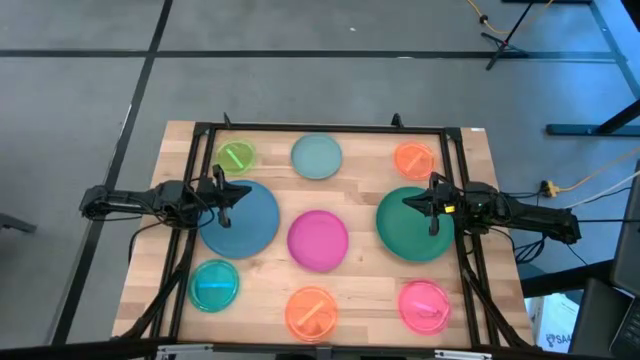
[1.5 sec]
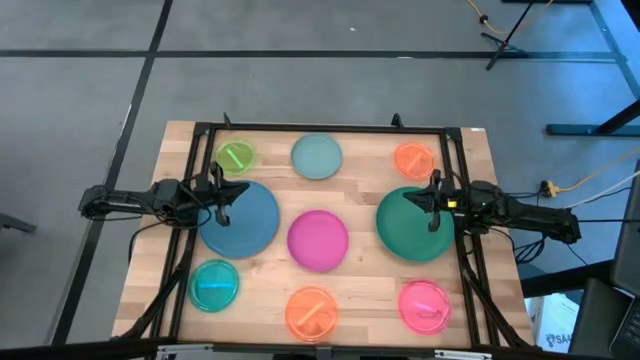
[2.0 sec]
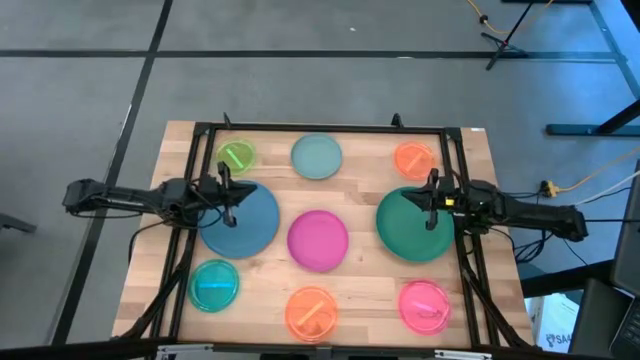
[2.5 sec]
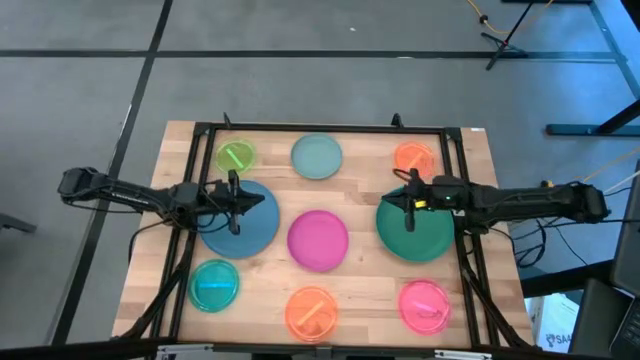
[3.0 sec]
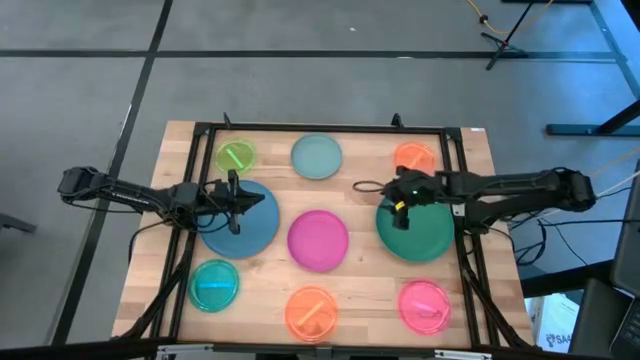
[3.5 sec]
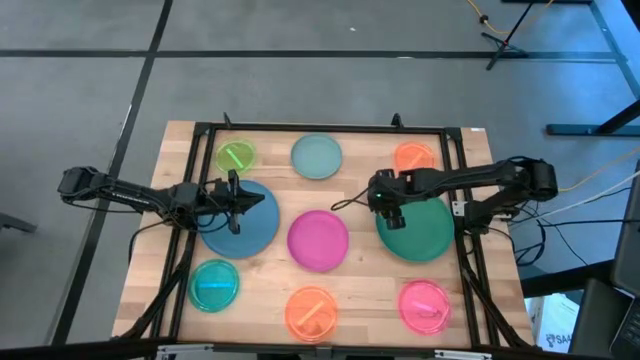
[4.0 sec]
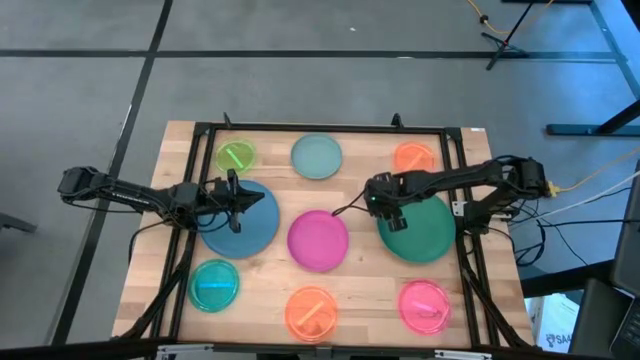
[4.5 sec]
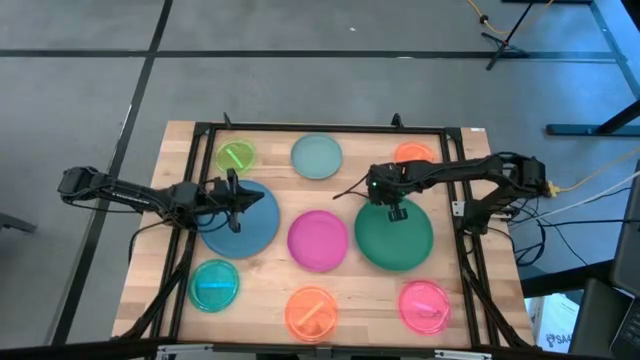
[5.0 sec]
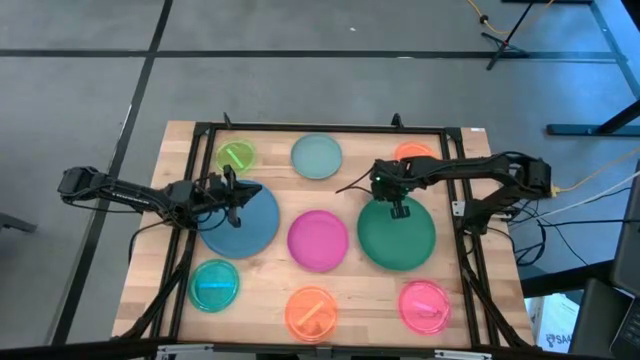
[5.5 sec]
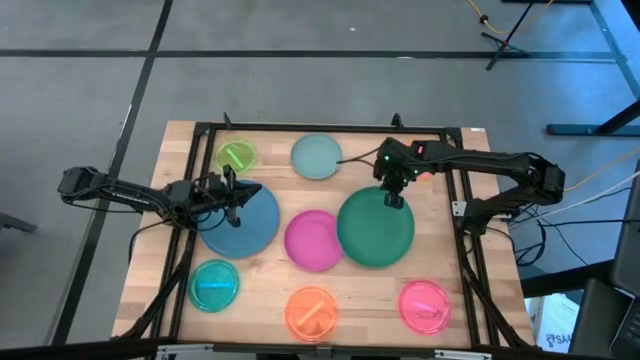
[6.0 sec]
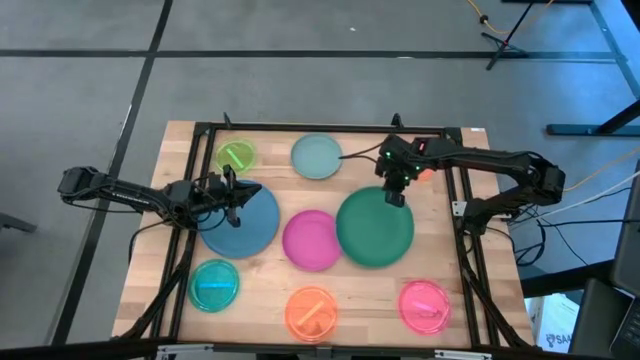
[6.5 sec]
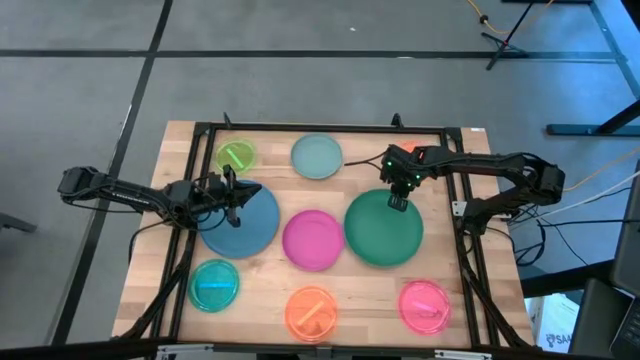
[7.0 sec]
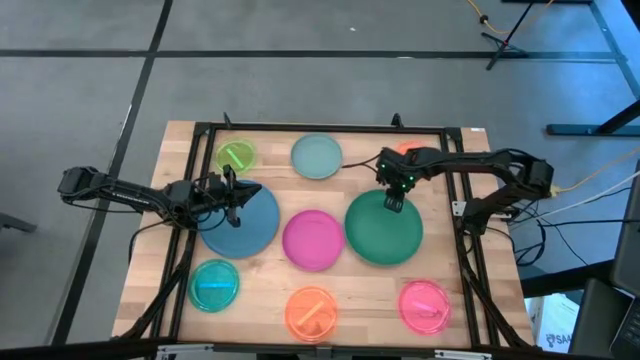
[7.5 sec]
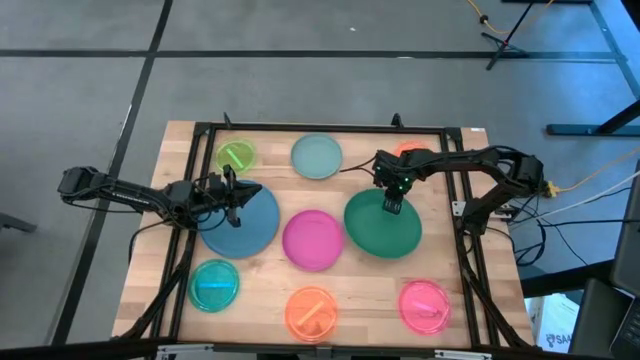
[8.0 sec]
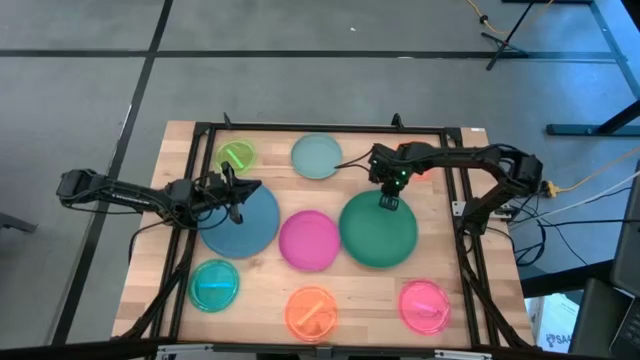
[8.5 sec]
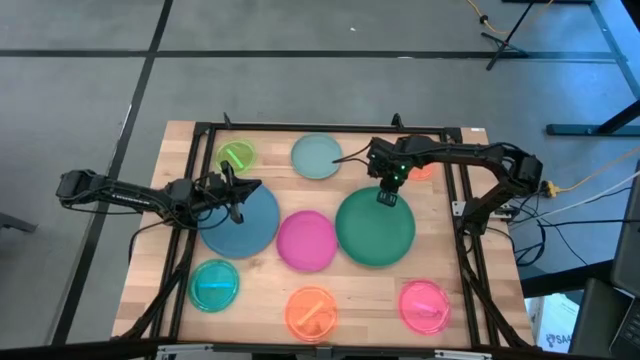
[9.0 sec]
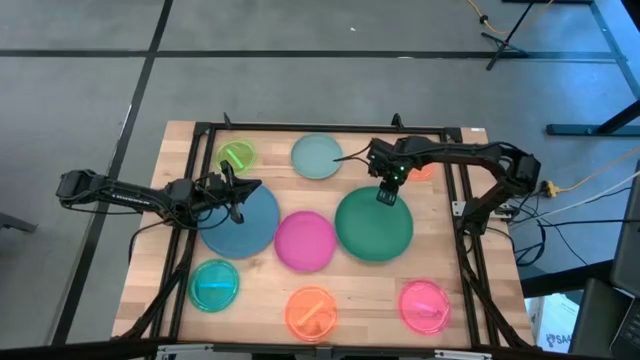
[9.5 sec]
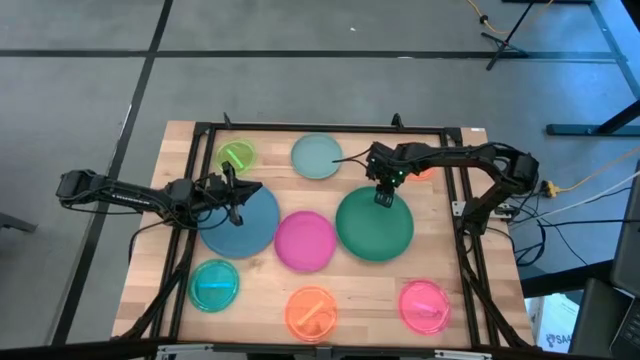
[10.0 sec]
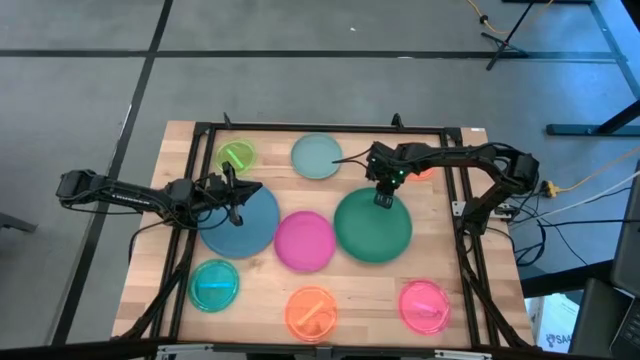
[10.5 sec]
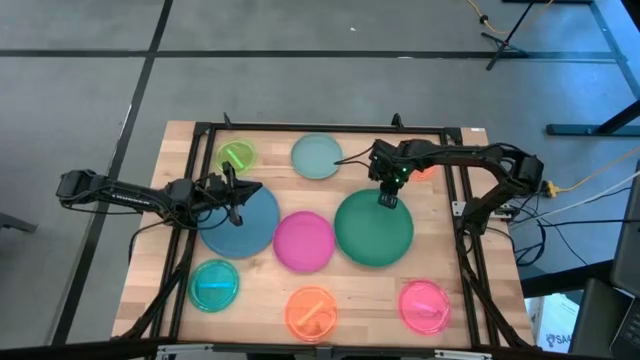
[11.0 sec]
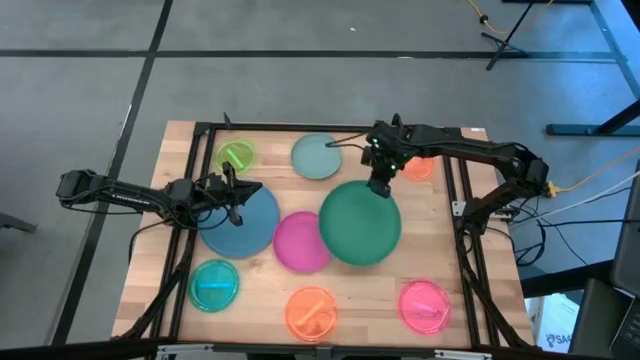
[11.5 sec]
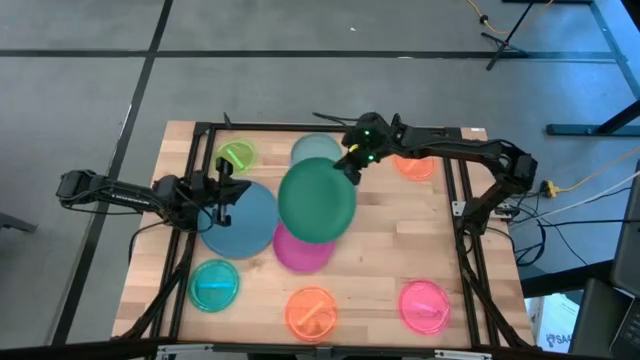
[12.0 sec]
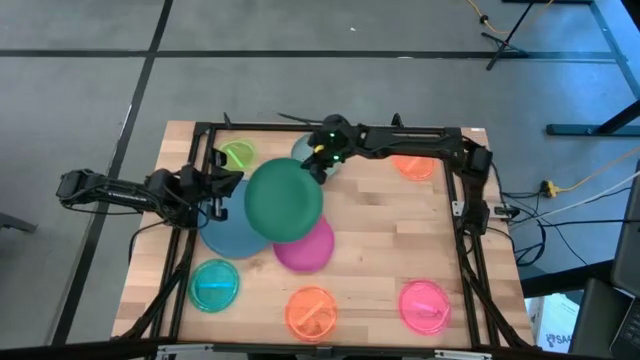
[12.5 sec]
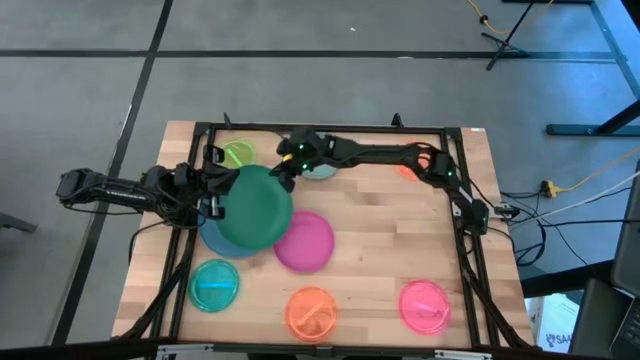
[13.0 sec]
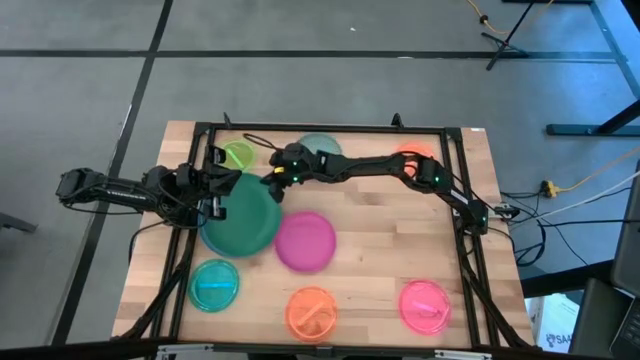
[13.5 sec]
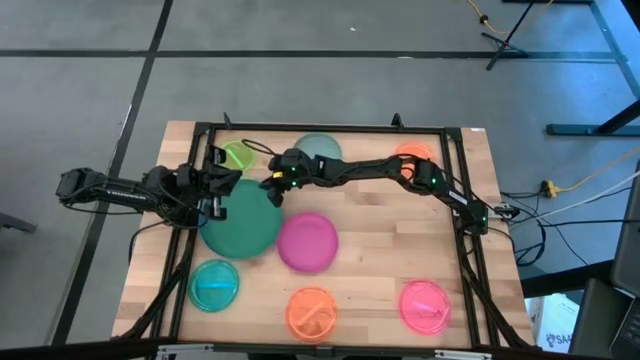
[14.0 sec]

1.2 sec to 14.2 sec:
Task: Stack plastic plates
Stack the green plate on top of the dark blue plate

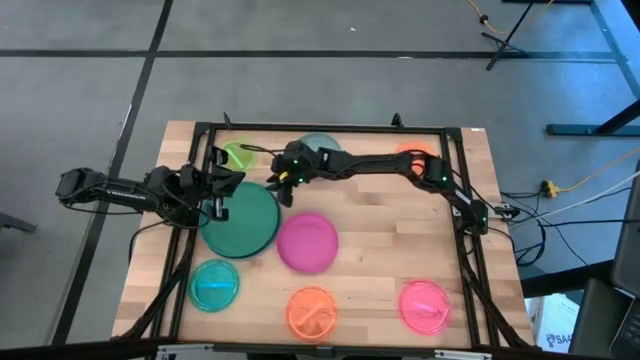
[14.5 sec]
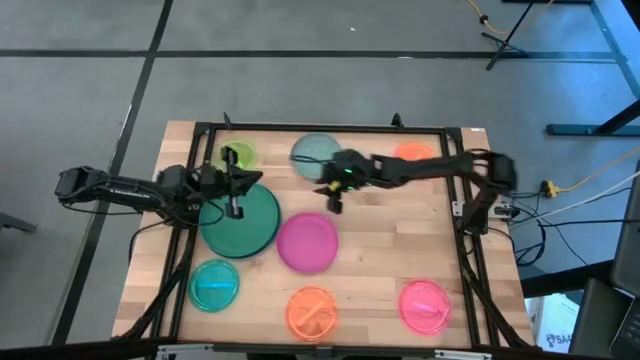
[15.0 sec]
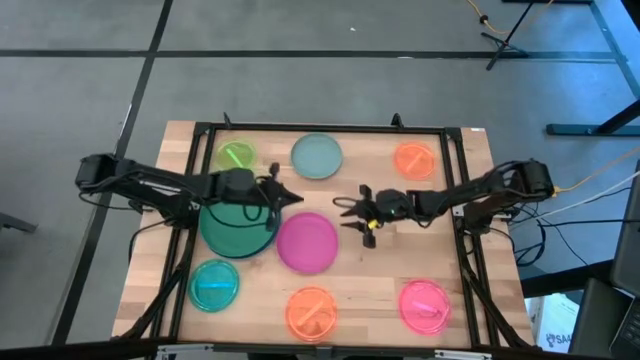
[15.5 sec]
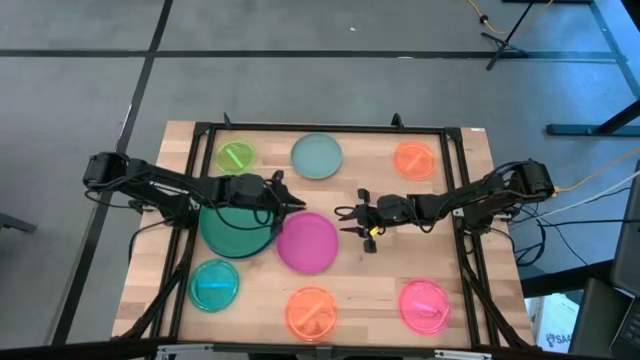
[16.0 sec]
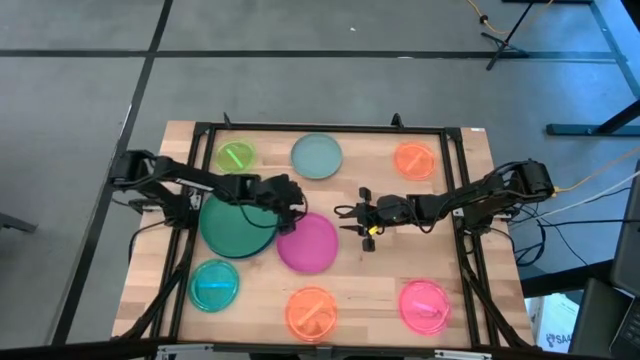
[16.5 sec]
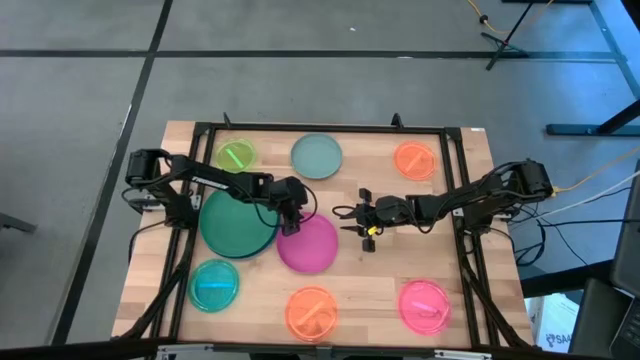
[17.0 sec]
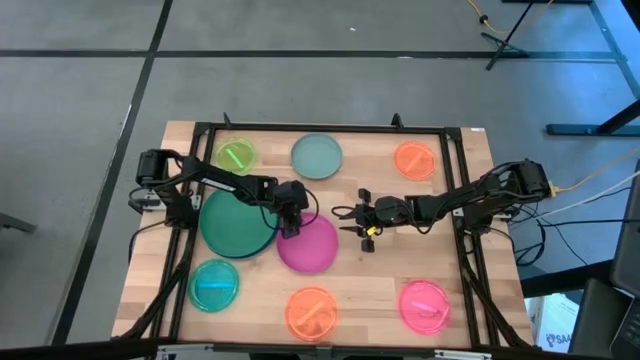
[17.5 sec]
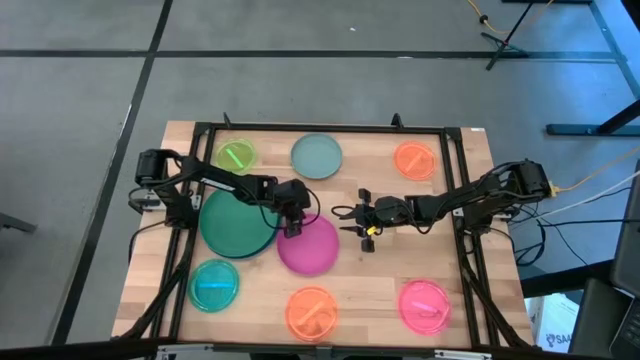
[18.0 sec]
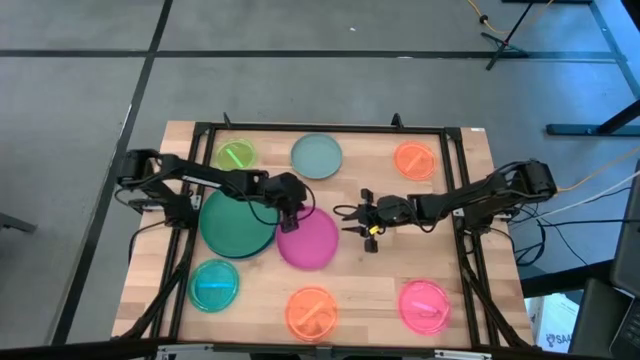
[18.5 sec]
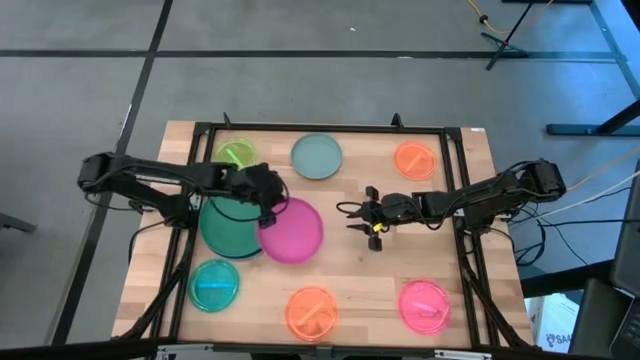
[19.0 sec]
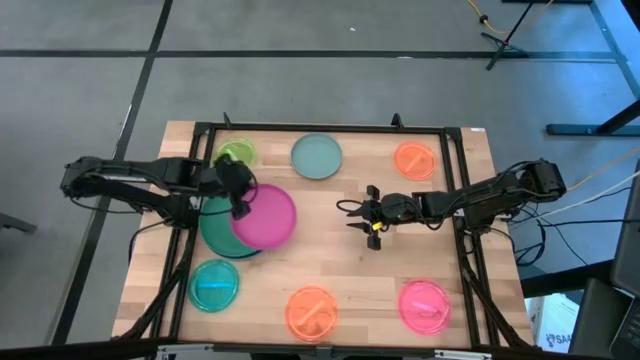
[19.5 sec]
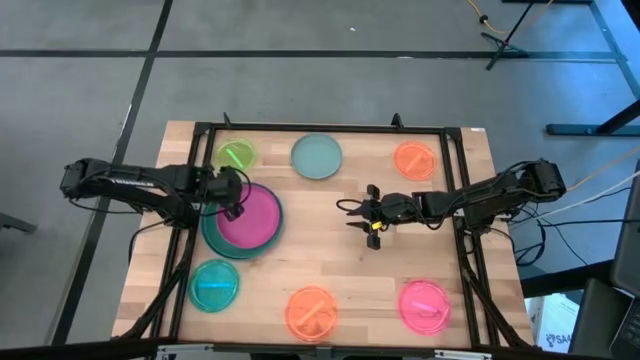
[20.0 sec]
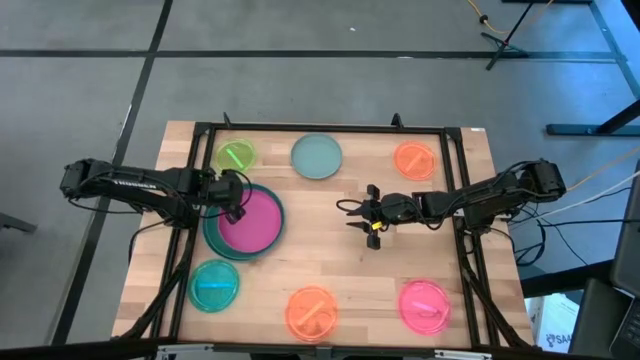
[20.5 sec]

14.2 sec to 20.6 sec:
Stack the pink plate on top the green plate

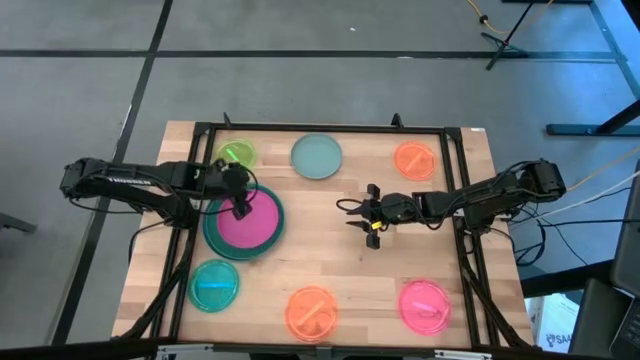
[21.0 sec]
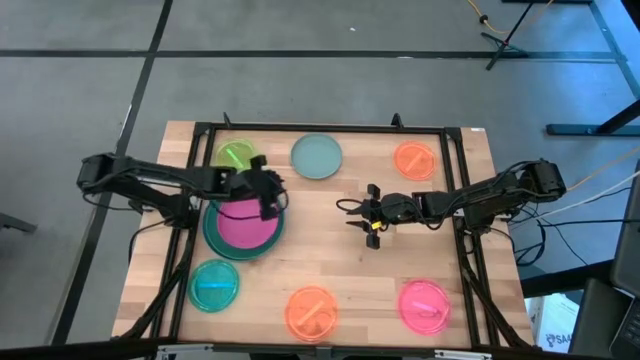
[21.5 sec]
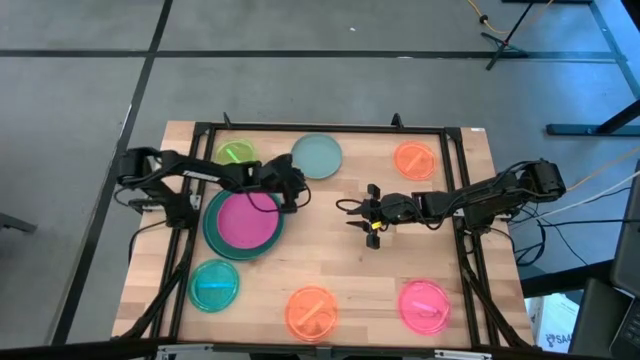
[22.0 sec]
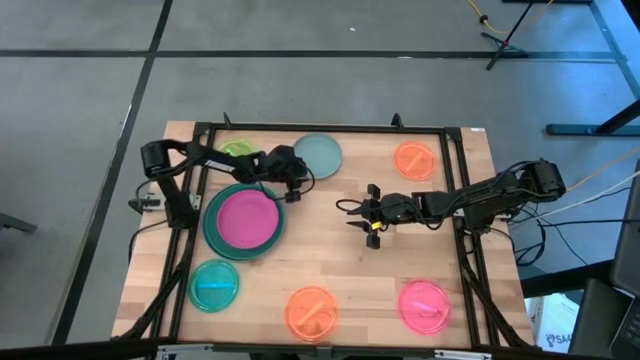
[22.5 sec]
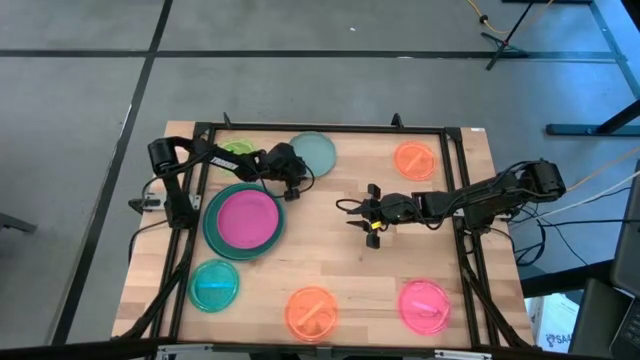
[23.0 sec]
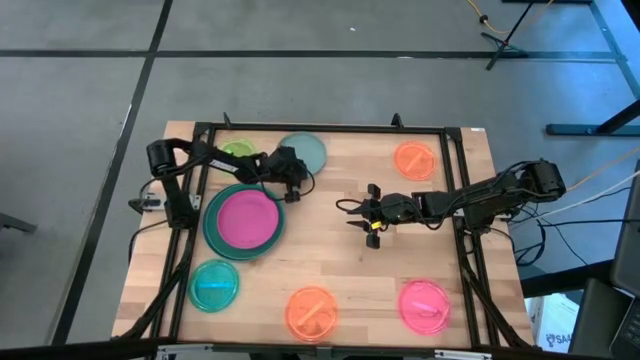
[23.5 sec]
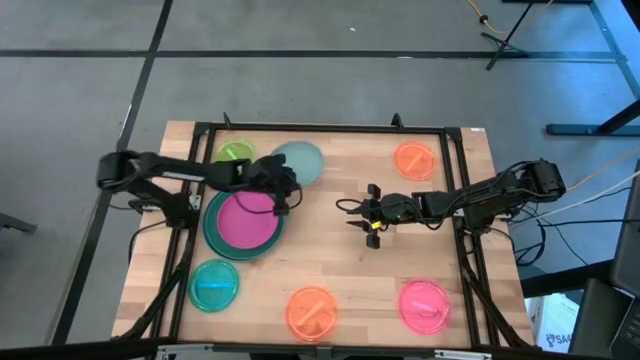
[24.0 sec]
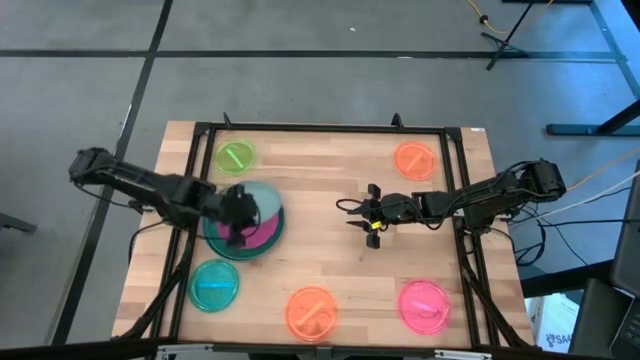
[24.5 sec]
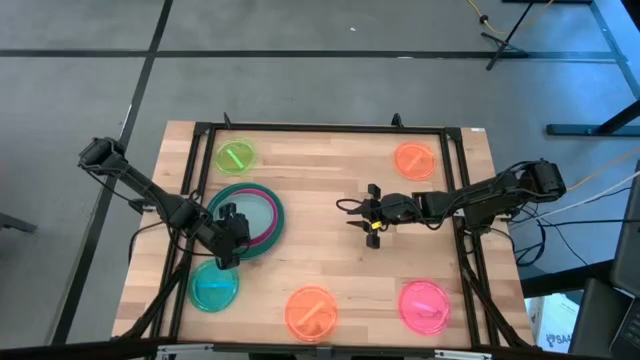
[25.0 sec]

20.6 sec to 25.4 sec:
Stack the light blue plate on top of the pink plate
